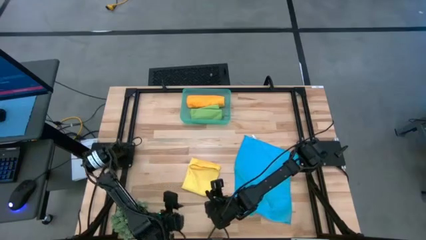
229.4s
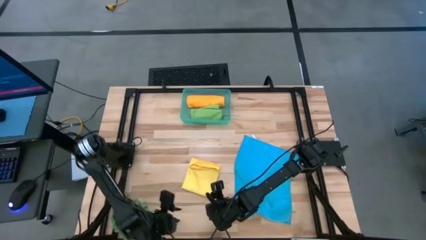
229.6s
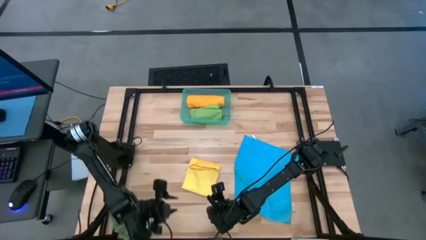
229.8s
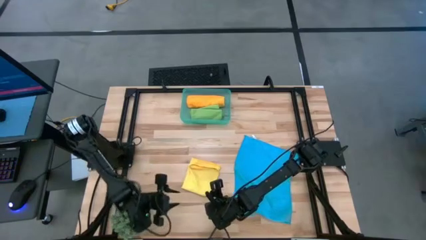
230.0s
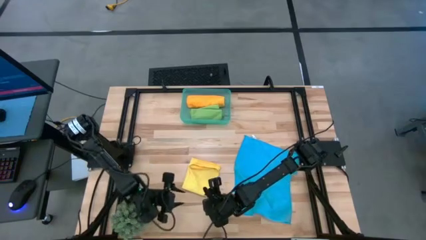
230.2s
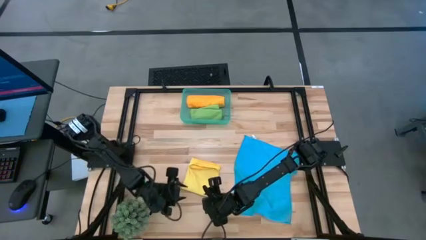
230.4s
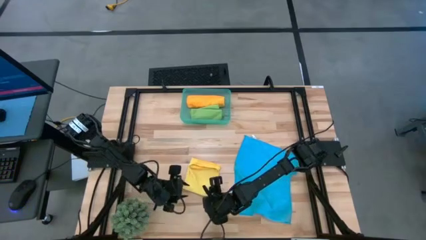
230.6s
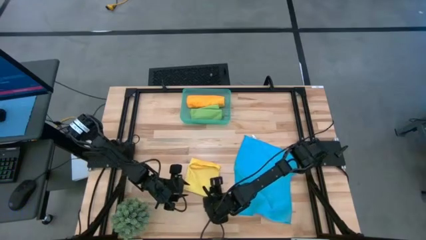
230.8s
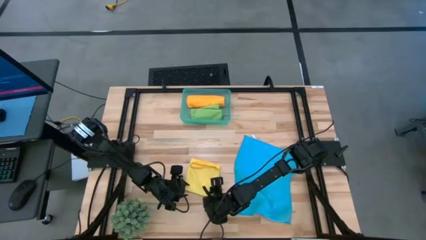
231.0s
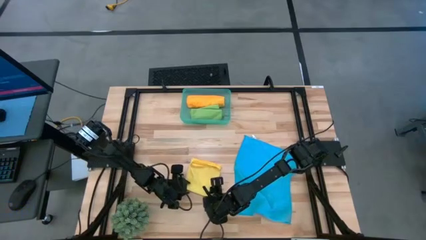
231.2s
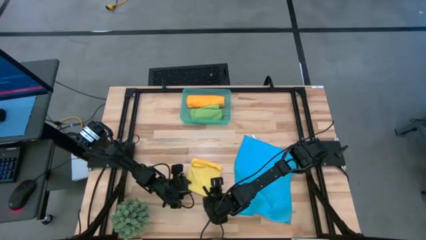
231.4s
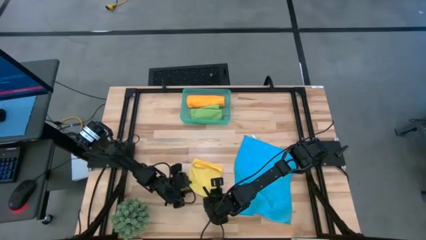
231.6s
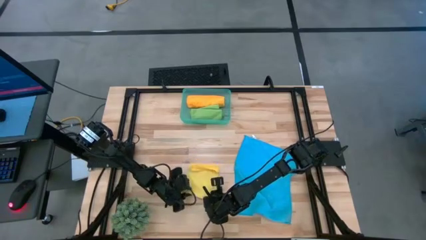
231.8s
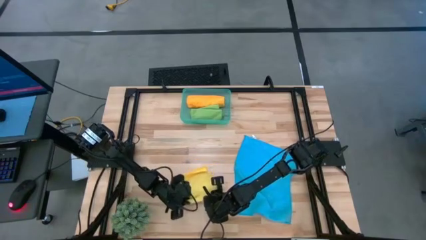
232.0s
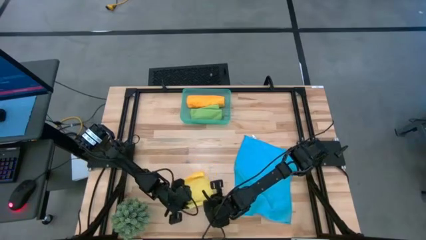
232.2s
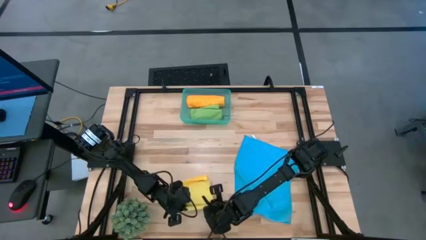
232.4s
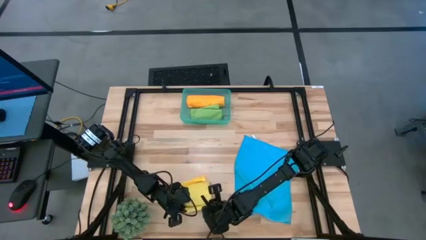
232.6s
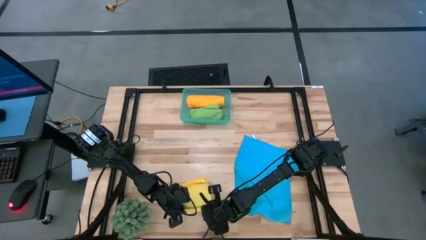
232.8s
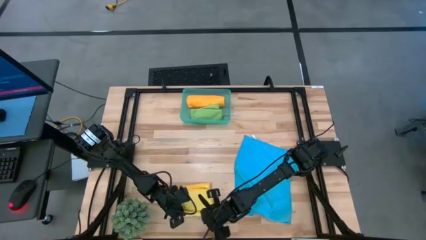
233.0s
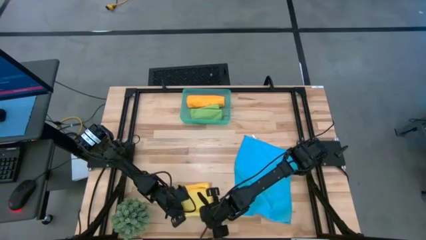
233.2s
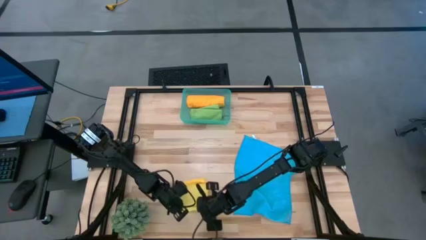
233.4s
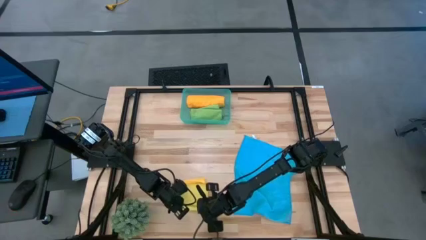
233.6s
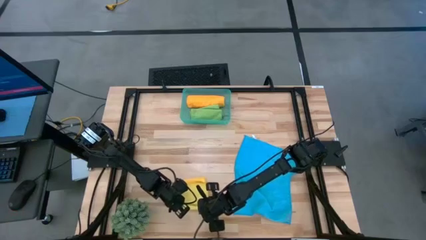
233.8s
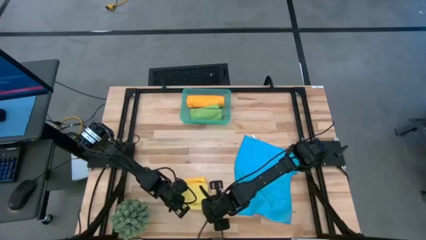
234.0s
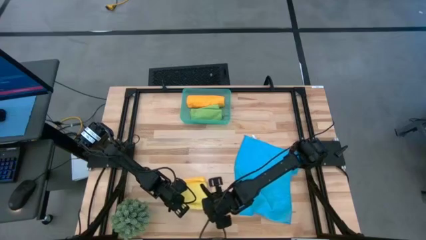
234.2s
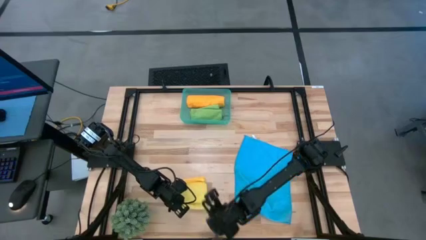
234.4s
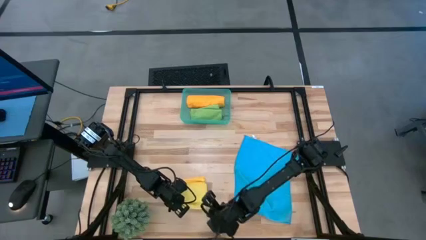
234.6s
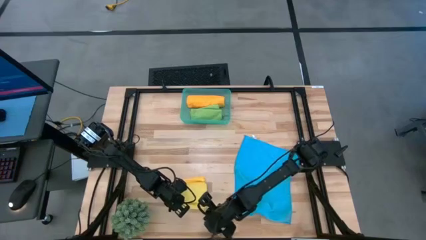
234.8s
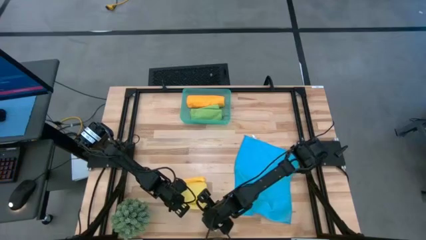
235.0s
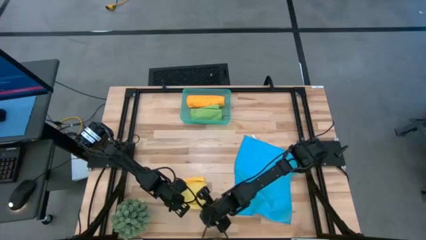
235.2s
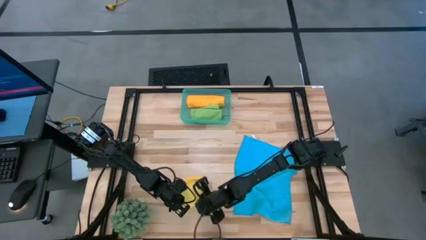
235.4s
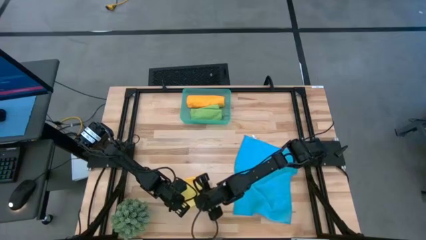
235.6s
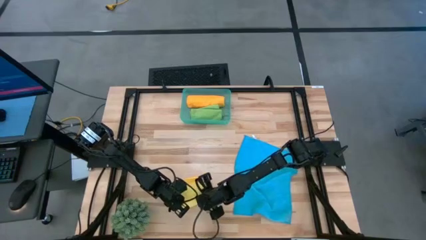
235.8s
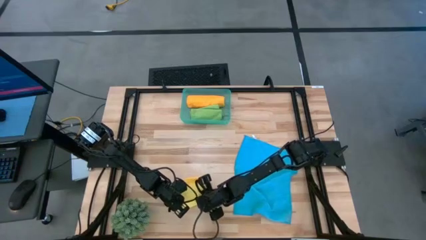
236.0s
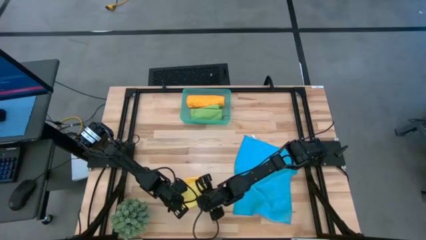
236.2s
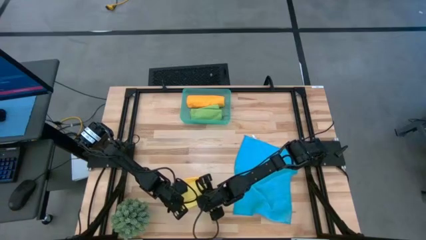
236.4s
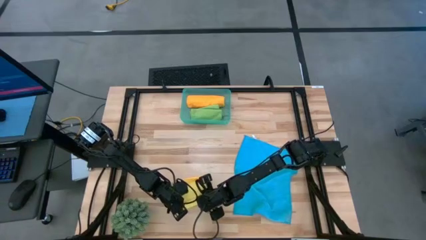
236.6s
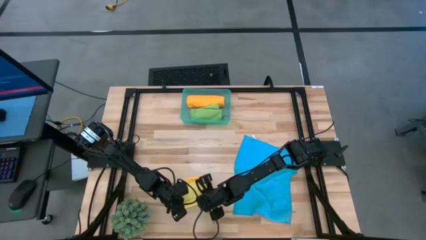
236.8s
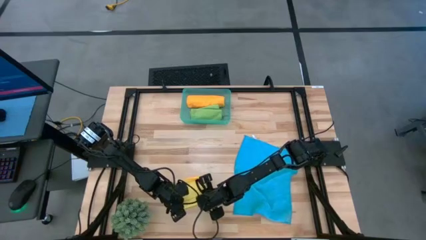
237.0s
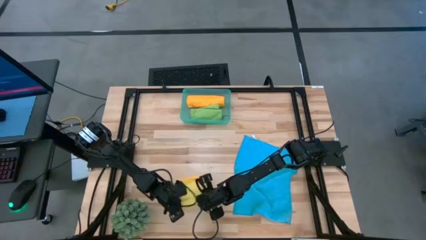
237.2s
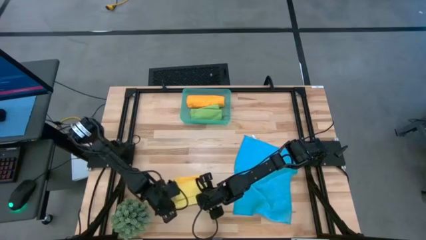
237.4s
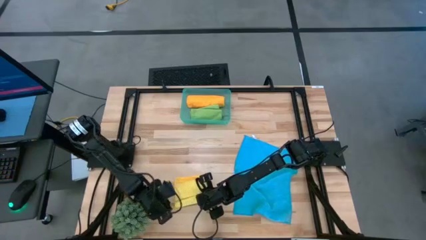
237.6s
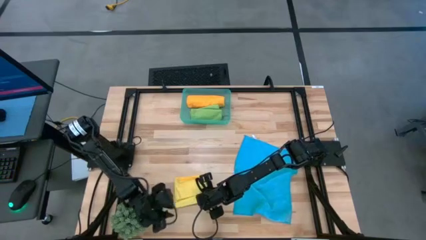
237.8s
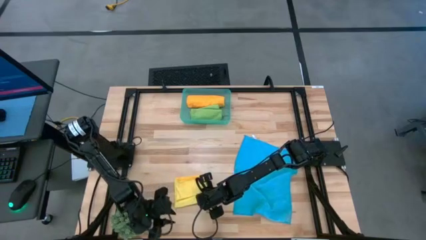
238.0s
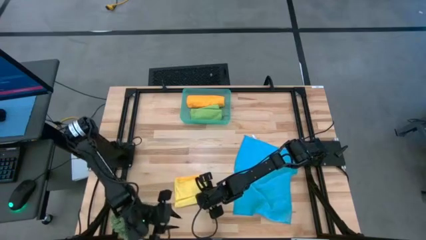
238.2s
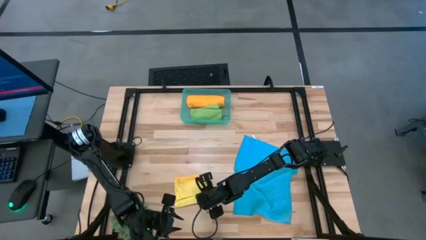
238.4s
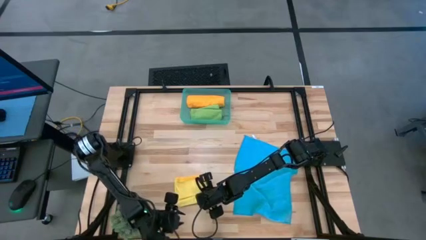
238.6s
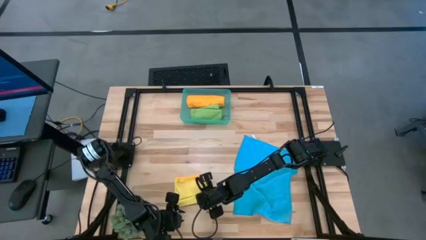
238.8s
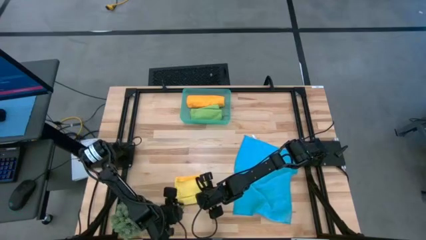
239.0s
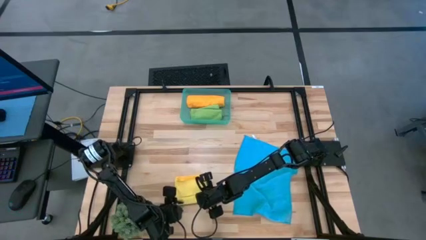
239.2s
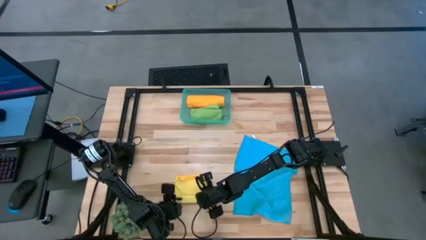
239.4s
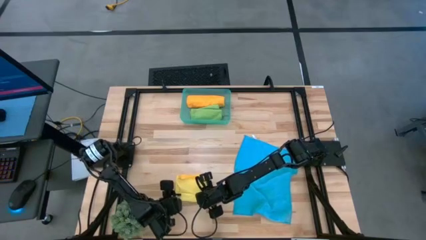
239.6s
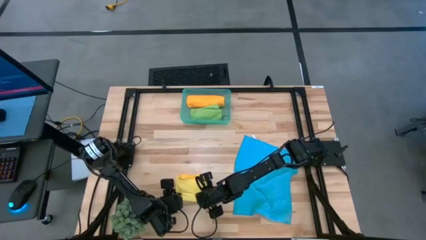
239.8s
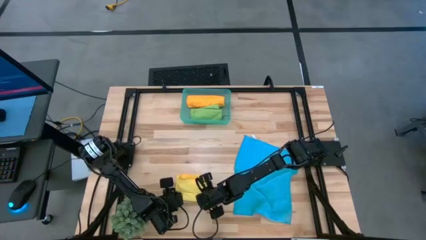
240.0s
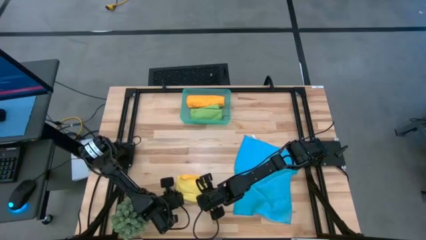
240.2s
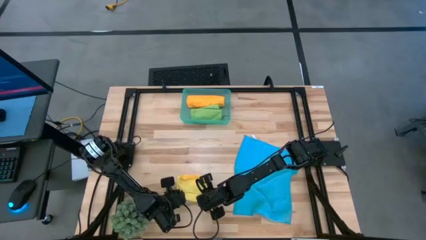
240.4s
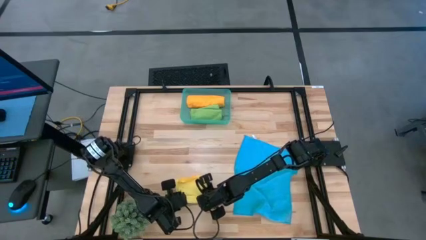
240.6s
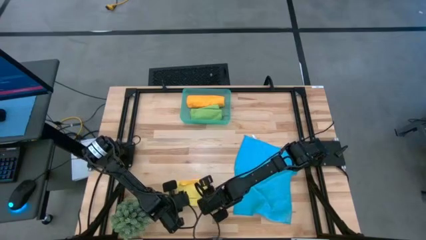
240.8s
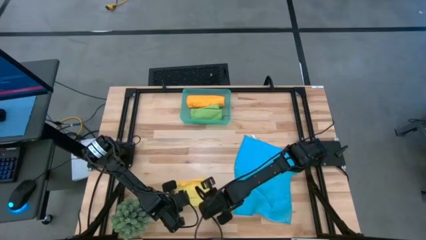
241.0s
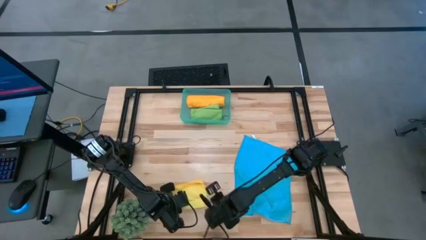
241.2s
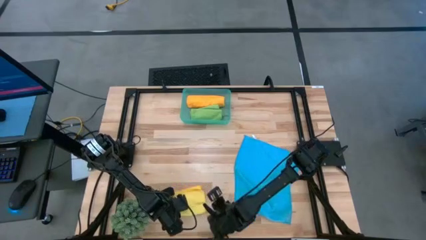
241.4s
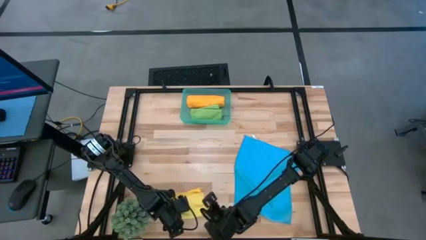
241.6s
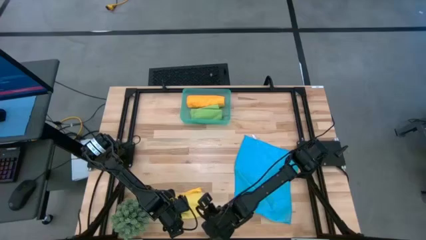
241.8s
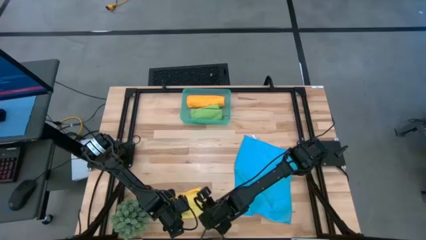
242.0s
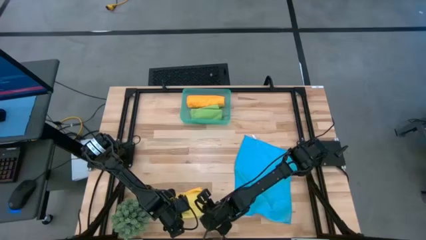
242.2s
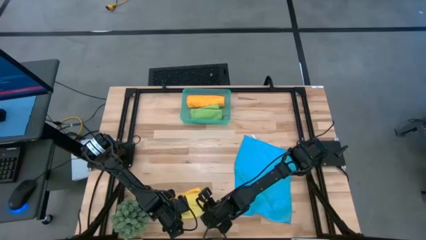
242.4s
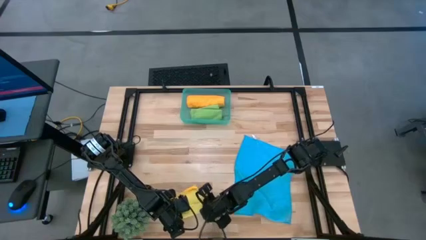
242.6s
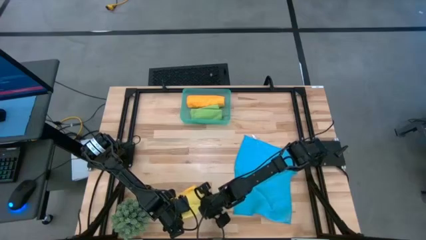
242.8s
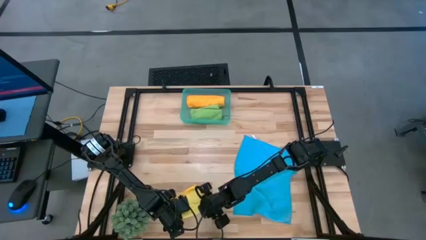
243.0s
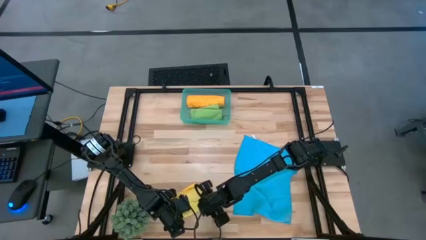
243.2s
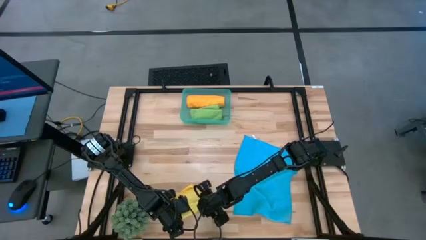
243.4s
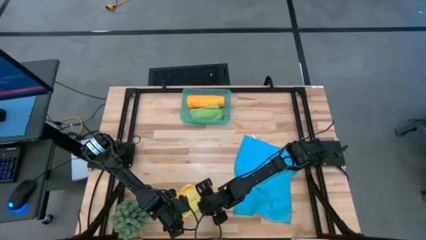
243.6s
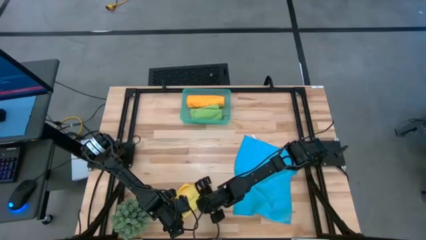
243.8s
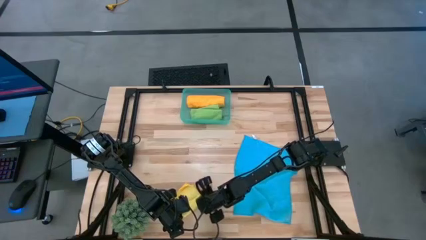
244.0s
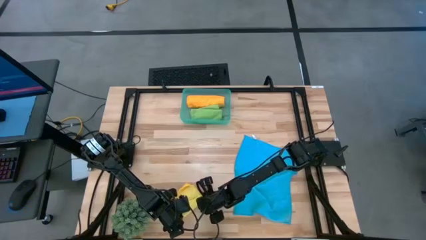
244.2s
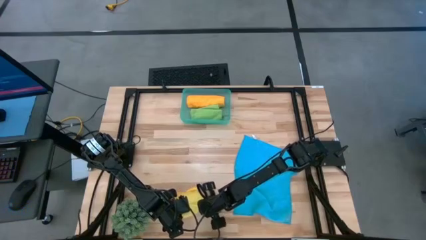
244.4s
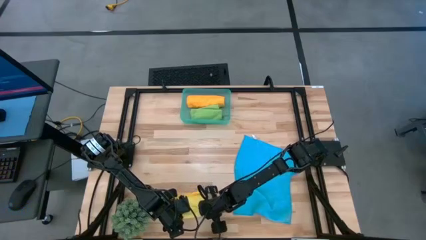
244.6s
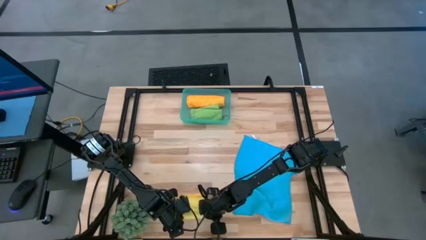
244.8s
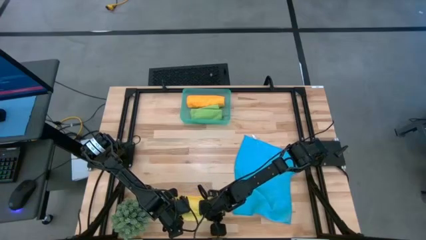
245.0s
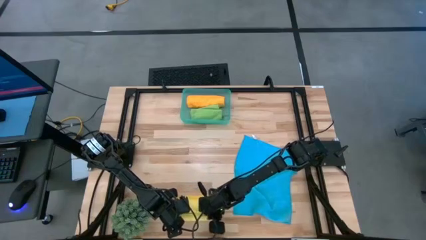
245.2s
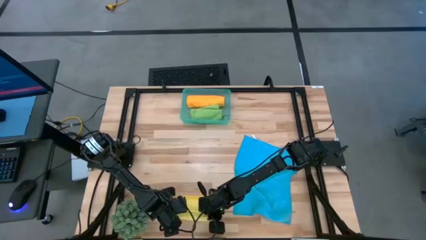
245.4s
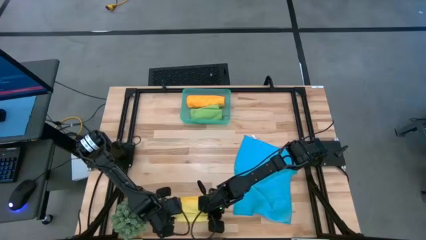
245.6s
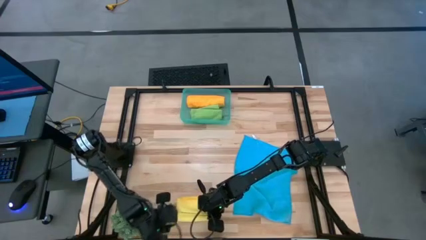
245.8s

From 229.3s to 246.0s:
Task: Roll microfiber towels into tight, uniform cylinder then place into a basket
Fold the yellow towel
